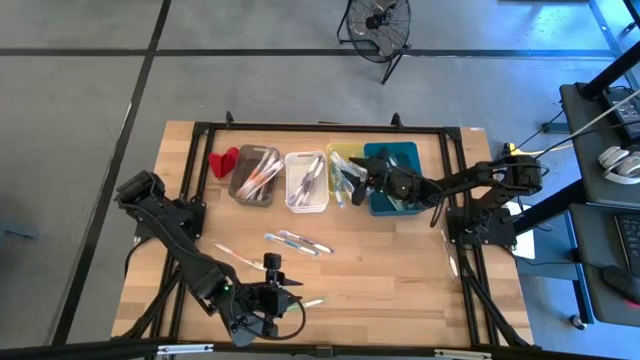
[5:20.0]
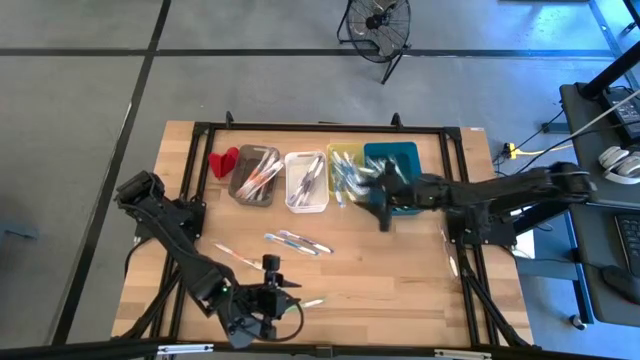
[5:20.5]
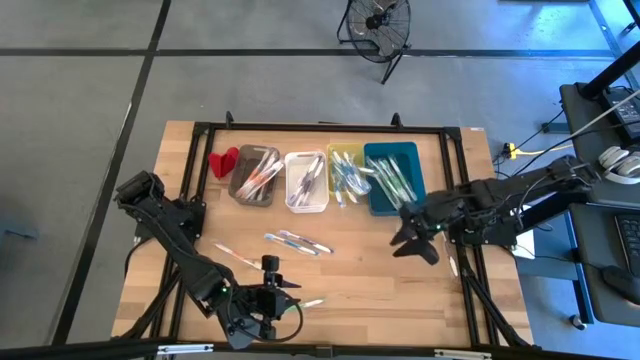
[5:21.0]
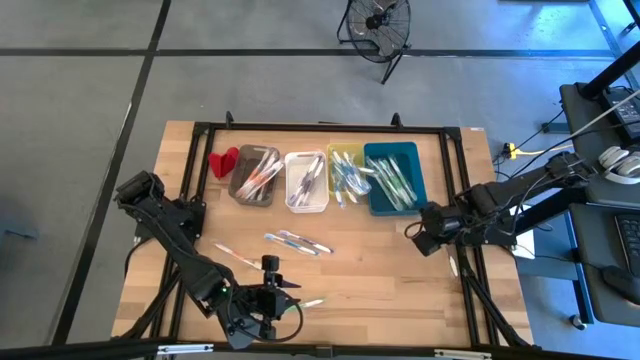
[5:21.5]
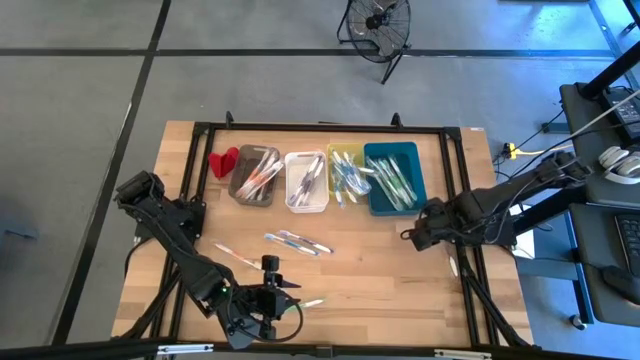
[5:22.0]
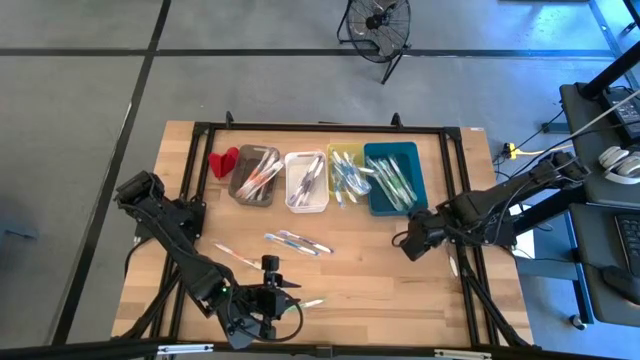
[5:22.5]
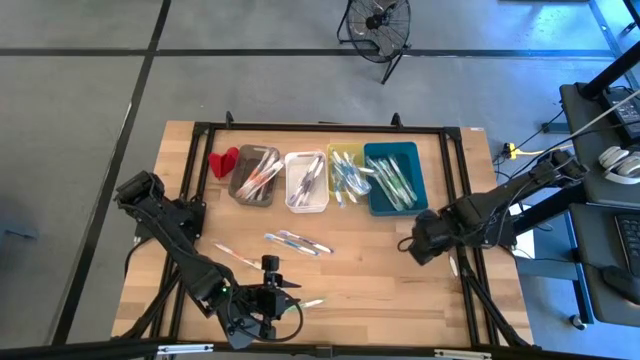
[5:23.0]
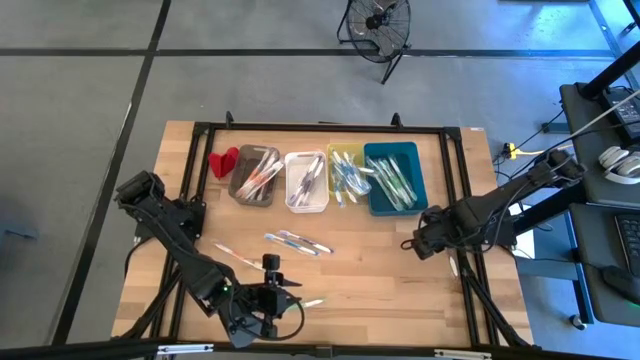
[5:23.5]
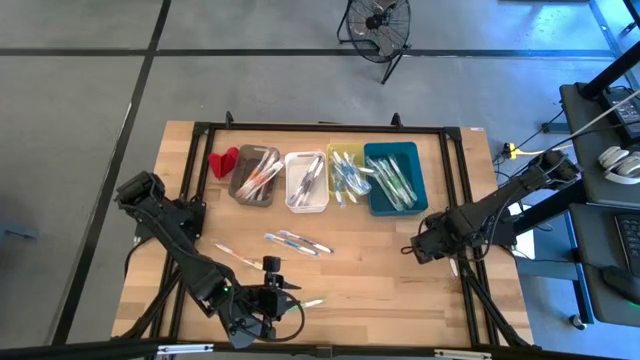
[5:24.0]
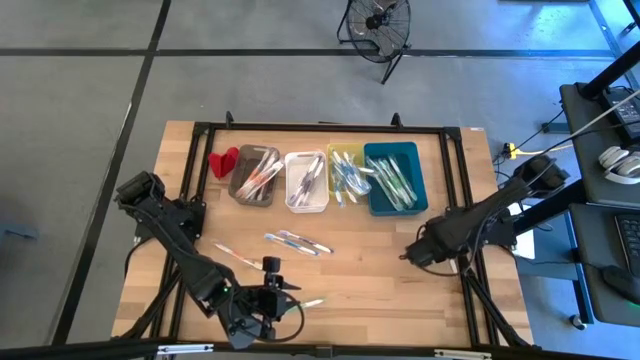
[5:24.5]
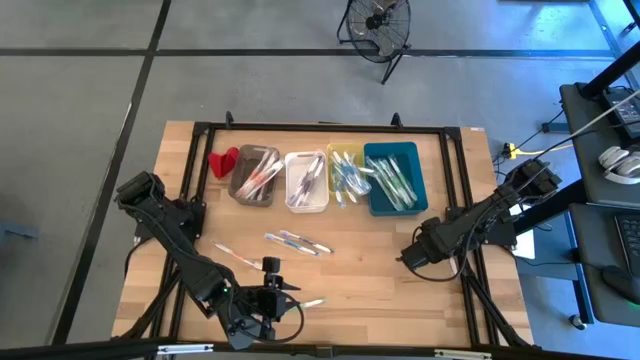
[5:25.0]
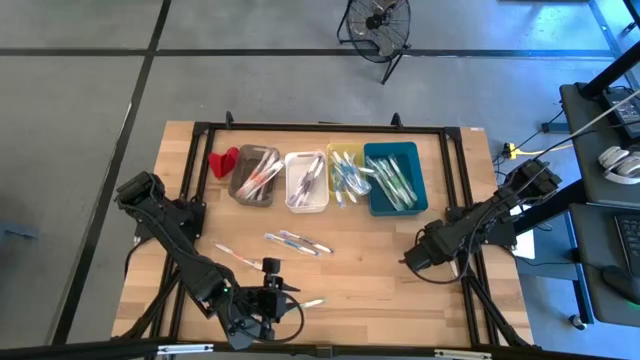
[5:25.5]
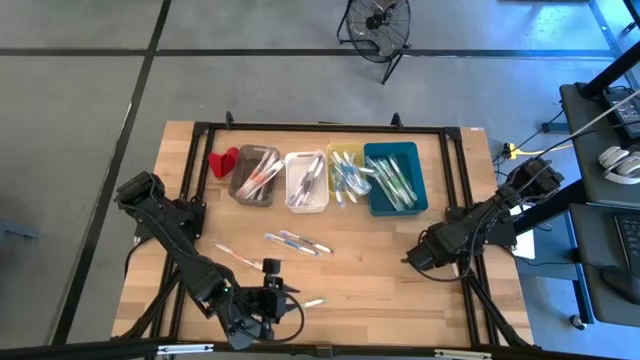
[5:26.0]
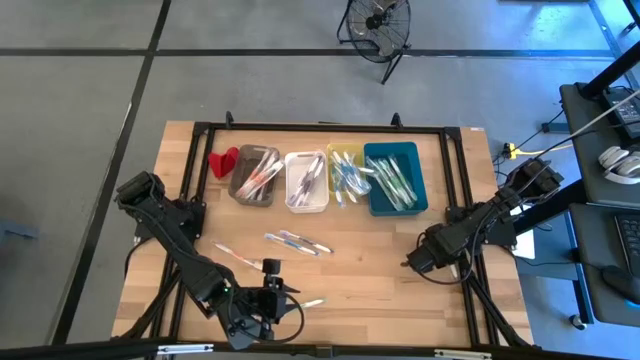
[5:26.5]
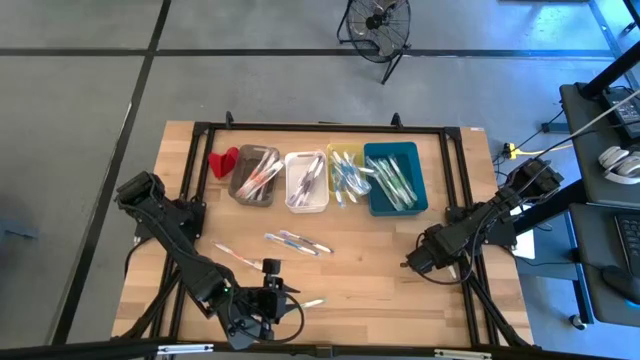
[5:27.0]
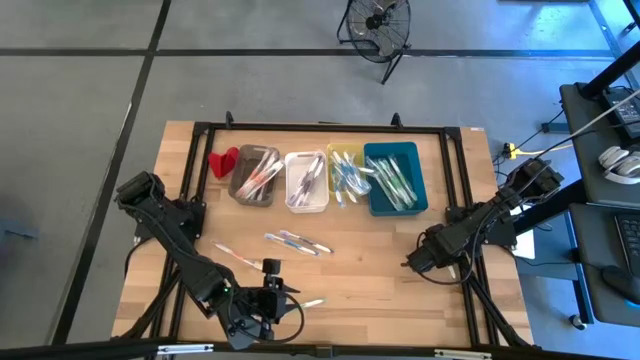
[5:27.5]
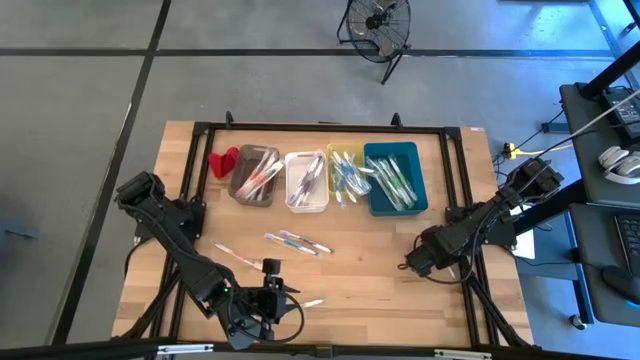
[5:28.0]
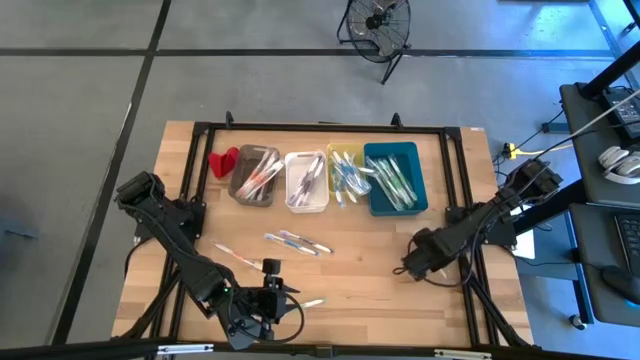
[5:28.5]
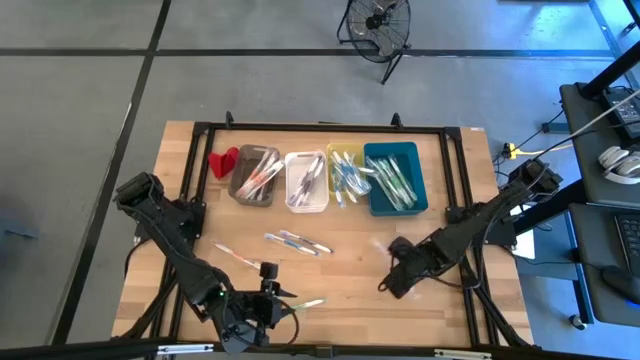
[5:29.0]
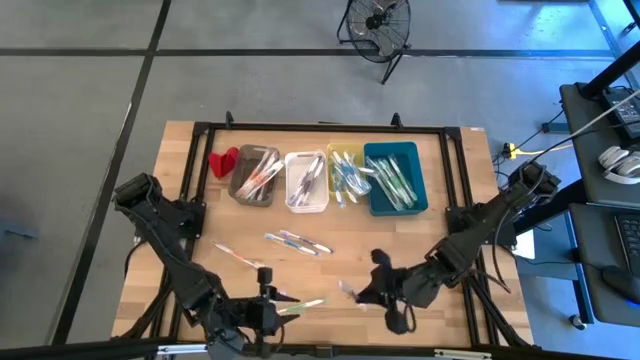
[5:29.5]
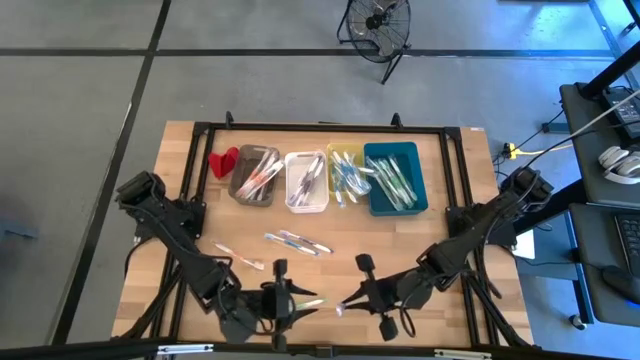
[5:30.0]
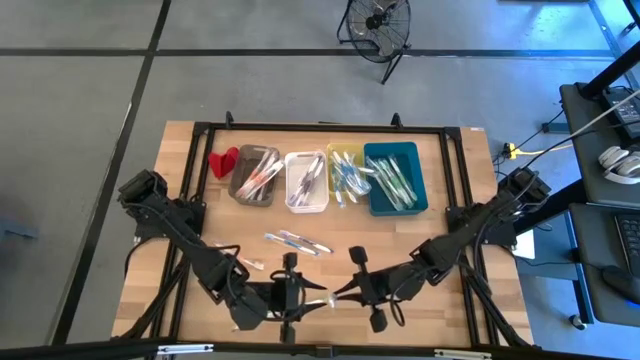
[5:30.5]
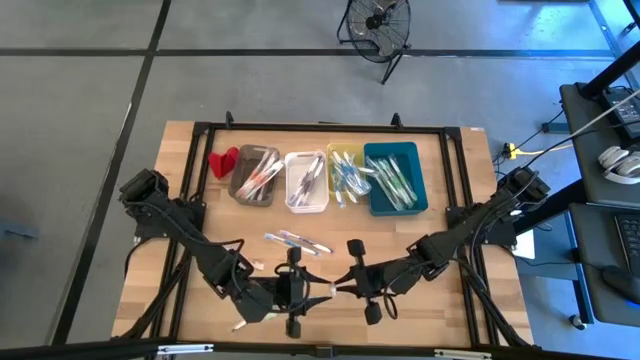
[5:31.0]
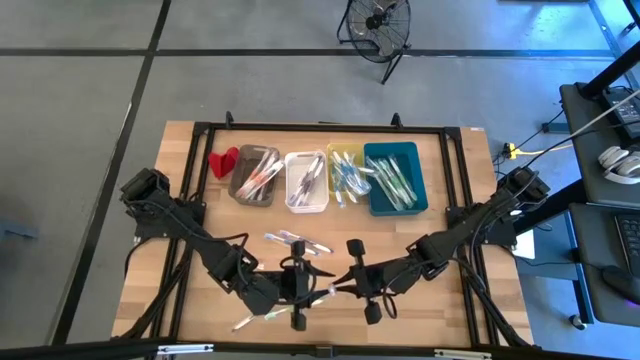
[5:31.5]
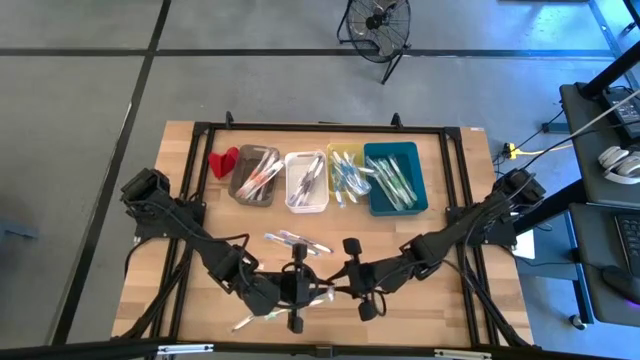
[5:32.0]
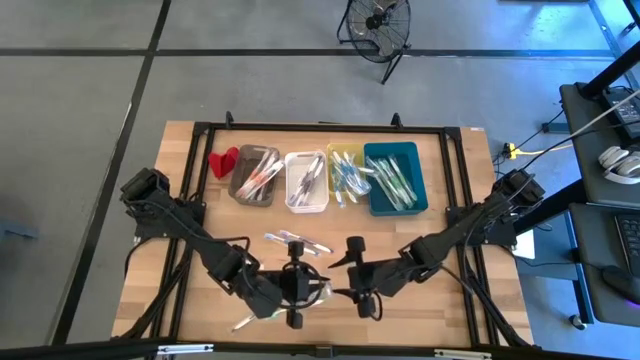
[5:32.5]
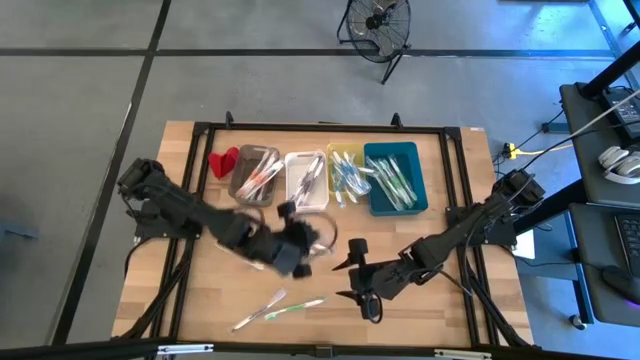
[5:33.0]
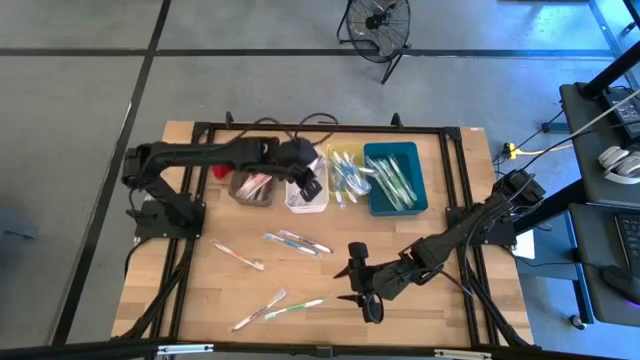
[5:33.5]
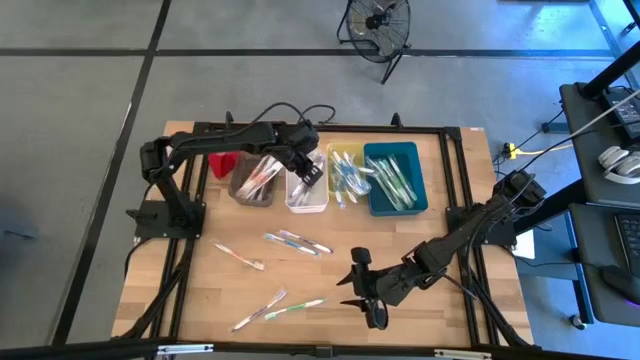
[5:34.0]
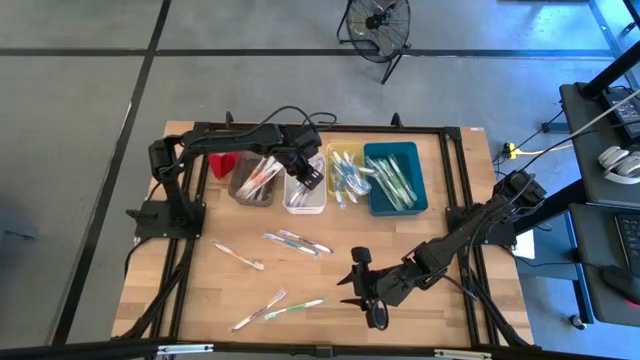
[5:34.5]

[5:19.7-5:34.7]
Task: Pick & Place Toothbrushes
Put the top right purple toothbrush into the white bin

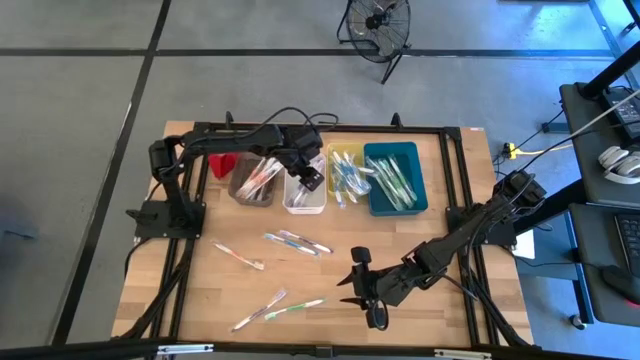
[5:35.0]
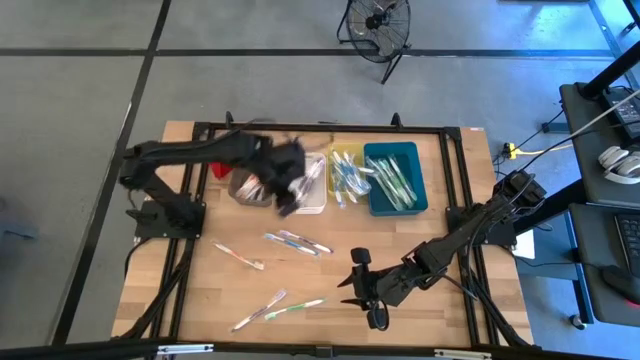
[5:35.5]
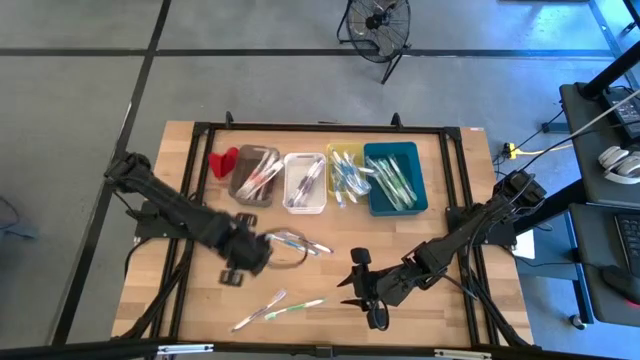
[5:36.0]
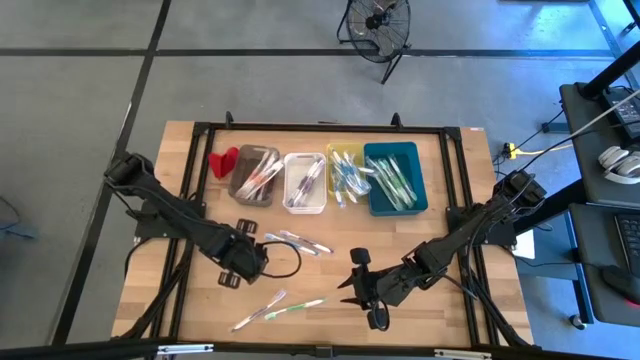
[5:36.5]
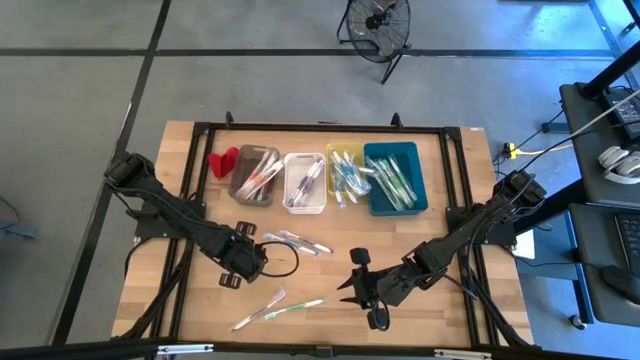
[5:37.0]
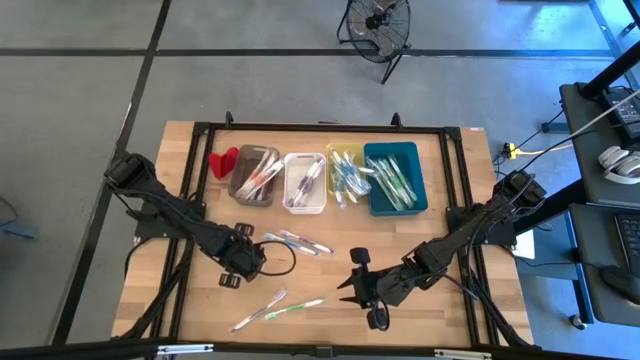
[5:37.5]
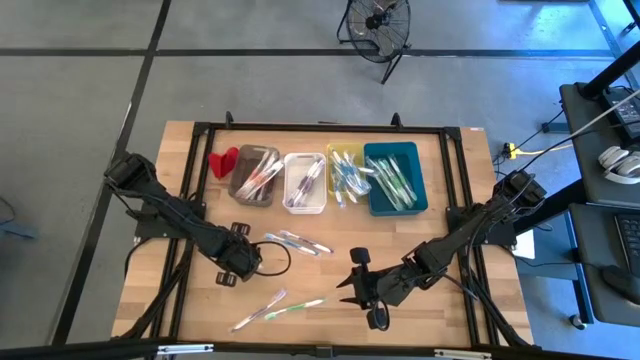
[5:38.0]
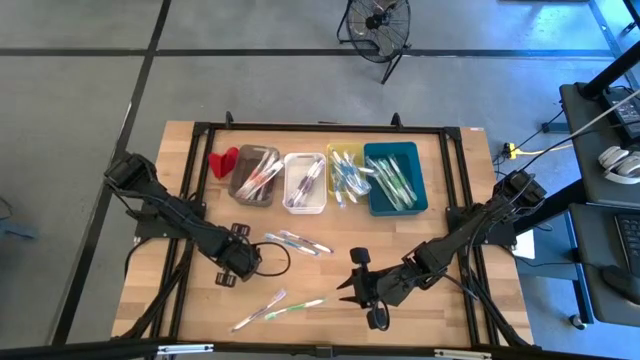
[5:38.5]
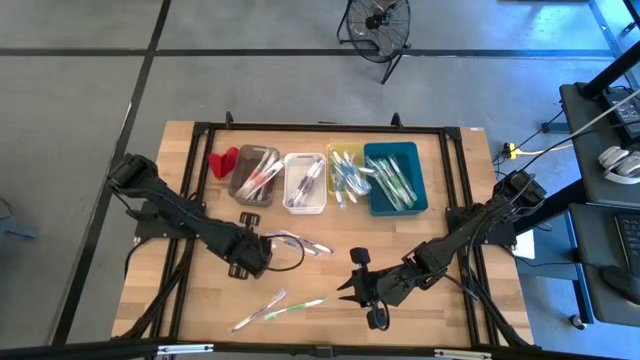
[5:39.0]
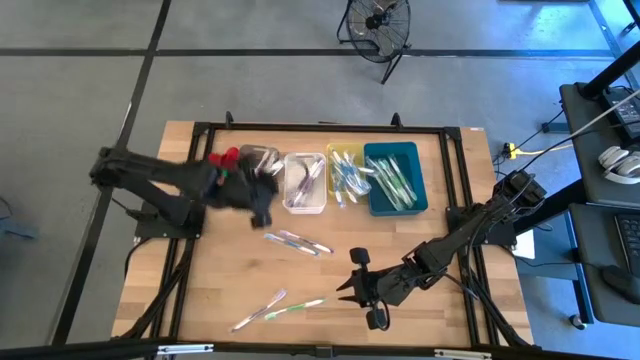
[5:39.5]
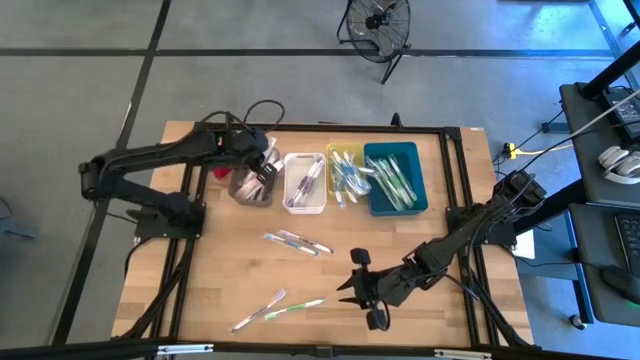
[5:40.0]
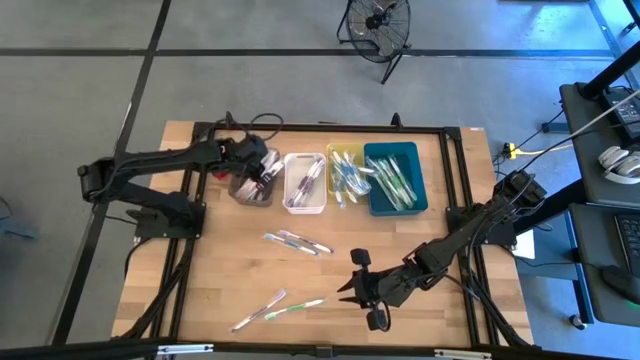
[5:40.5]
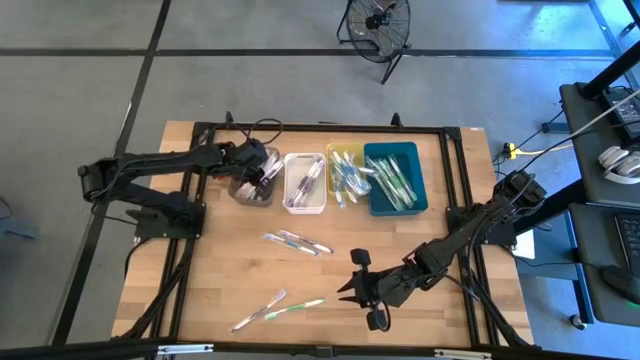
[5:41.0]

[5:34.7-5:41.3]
Put the orange toothbrush into the black bin
